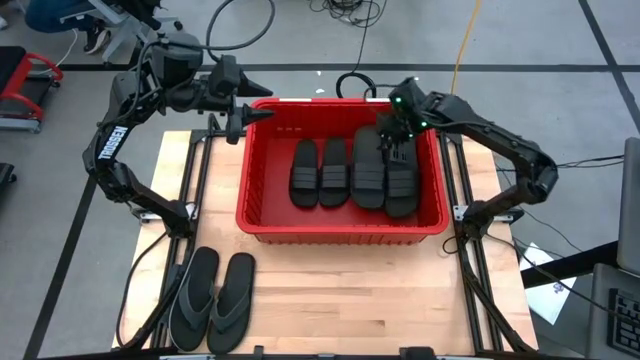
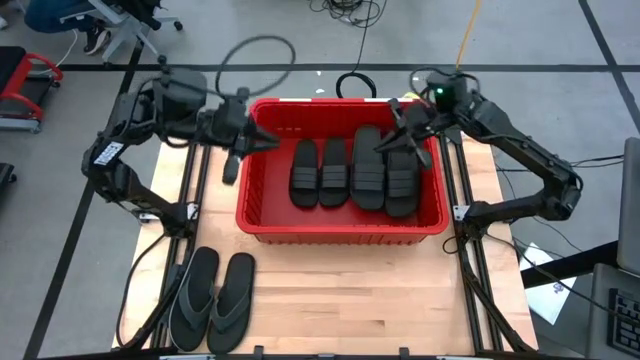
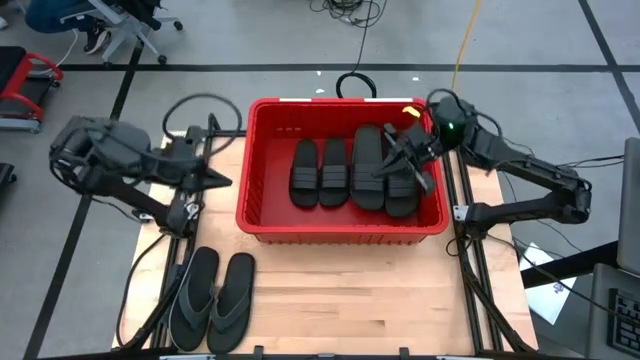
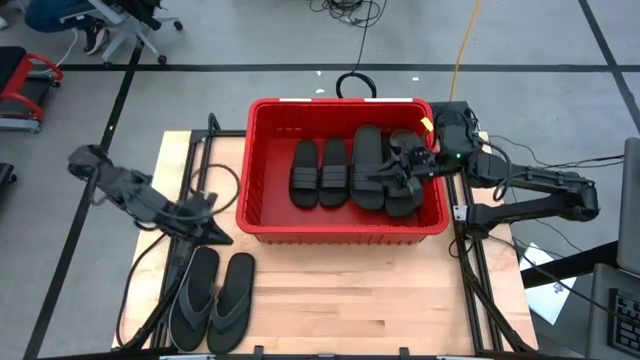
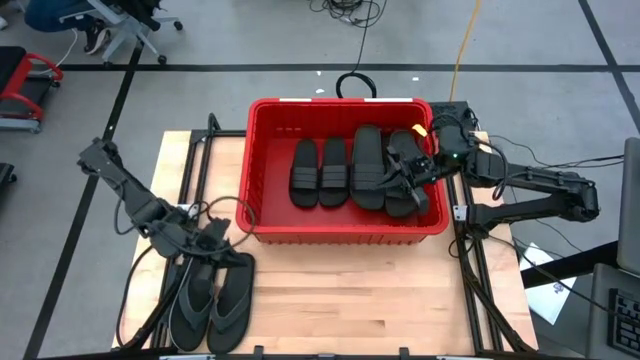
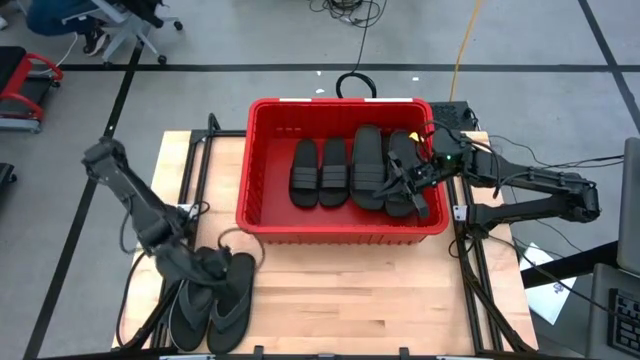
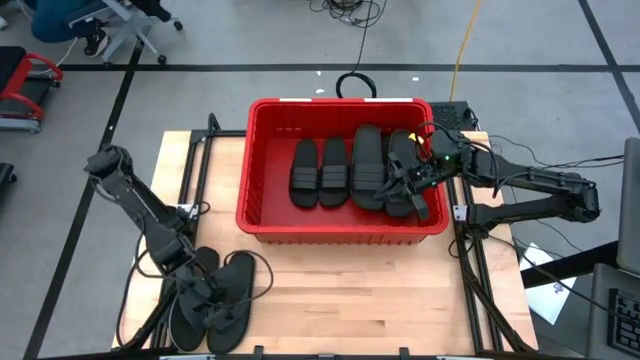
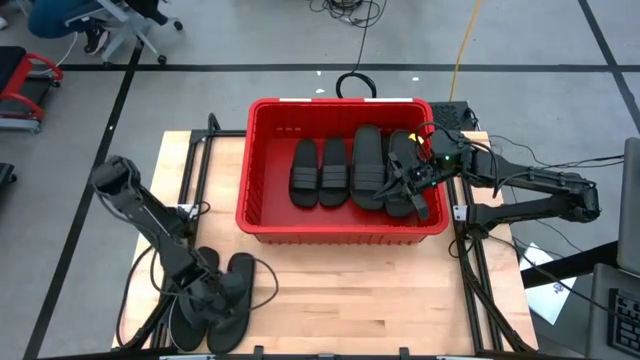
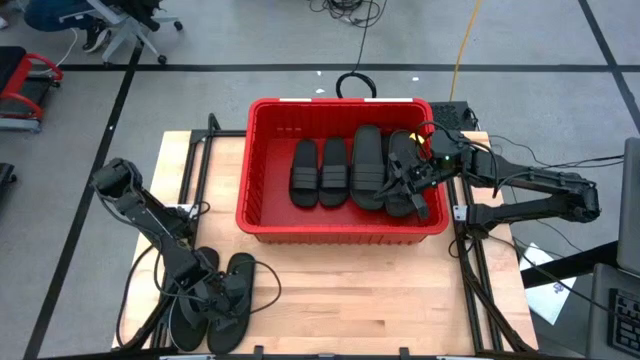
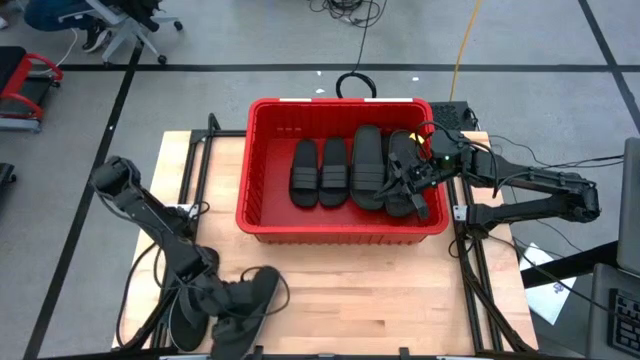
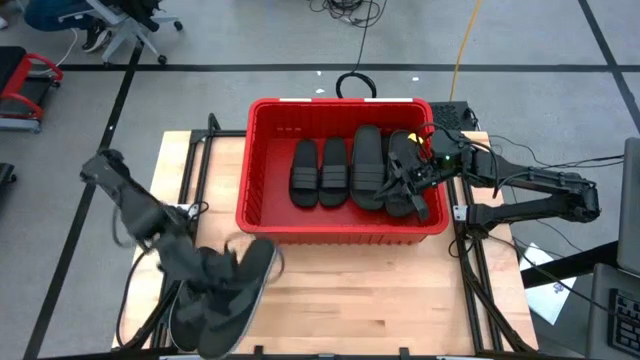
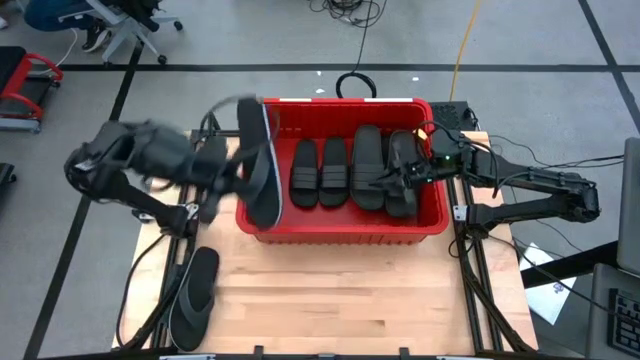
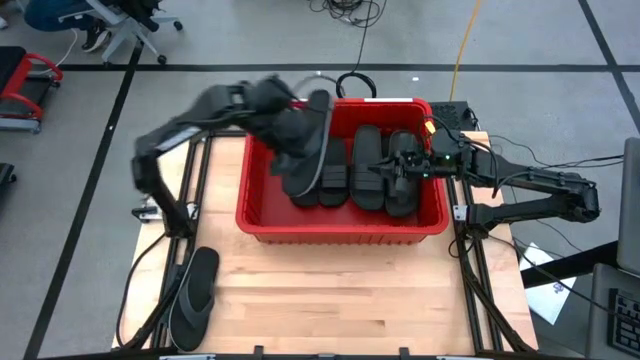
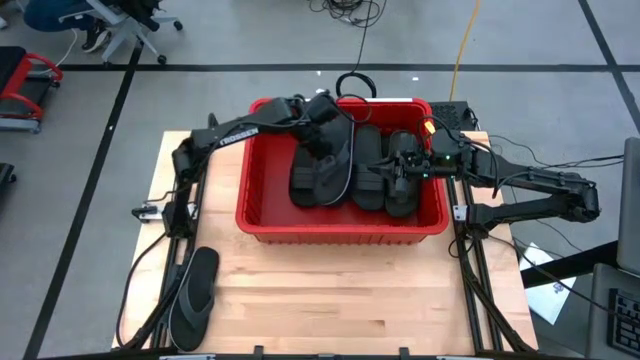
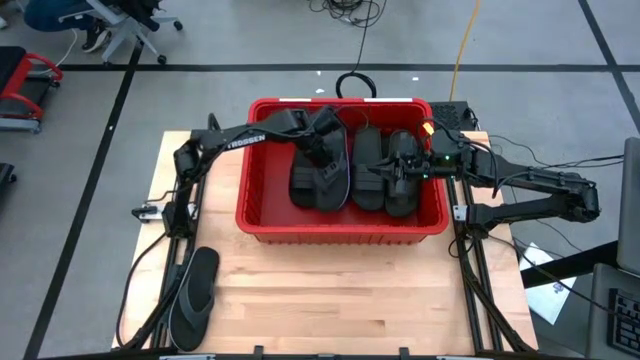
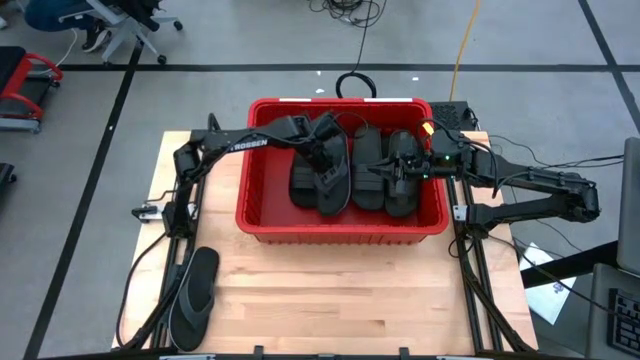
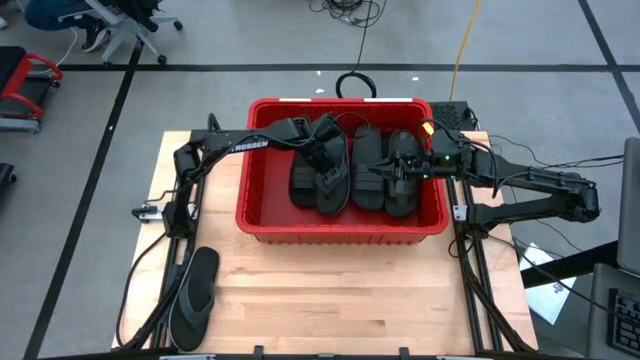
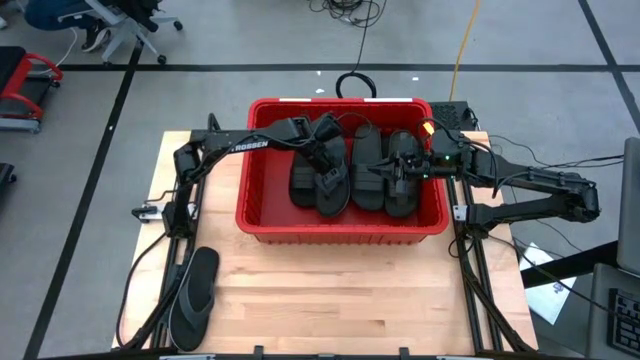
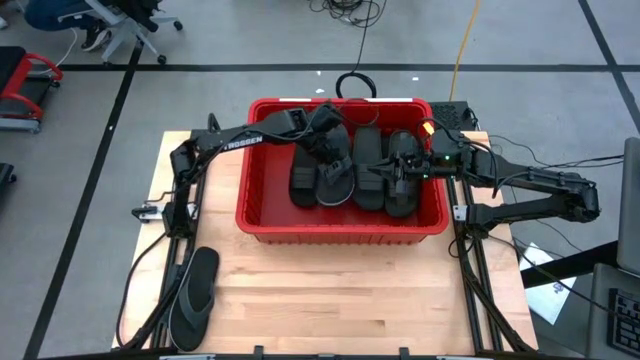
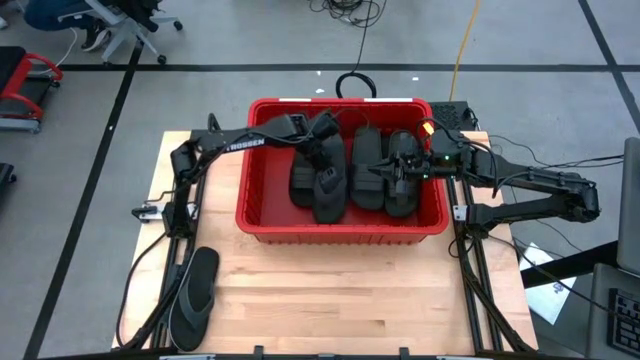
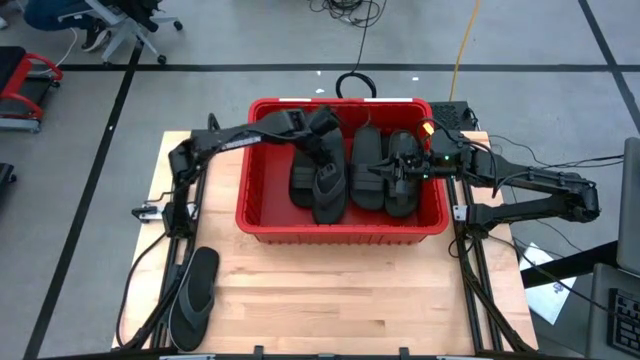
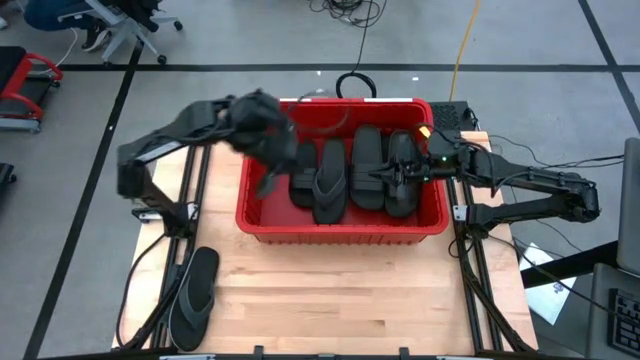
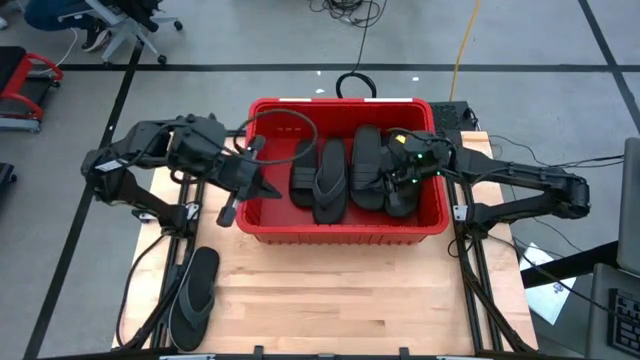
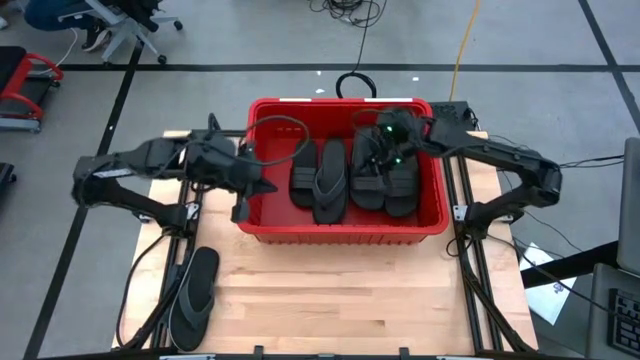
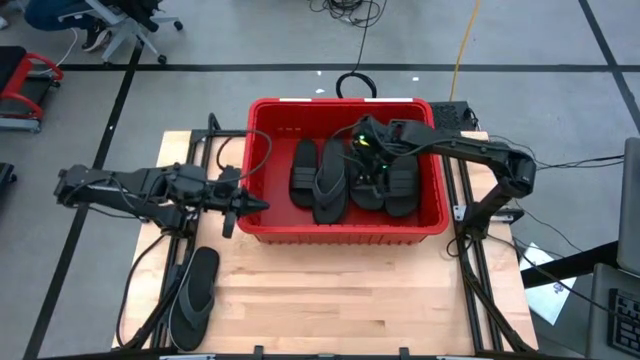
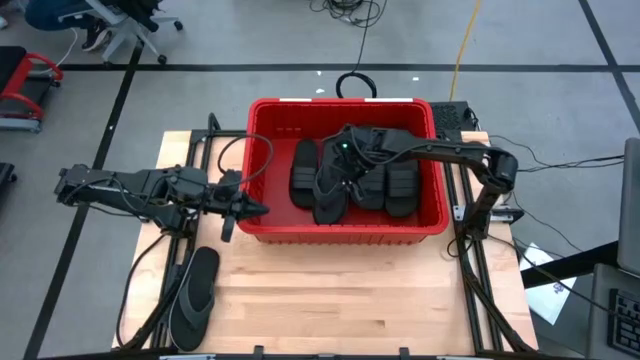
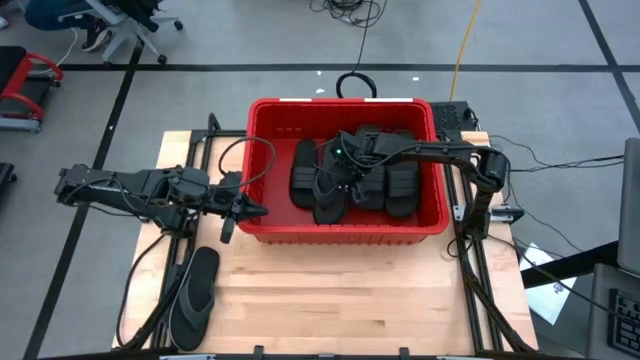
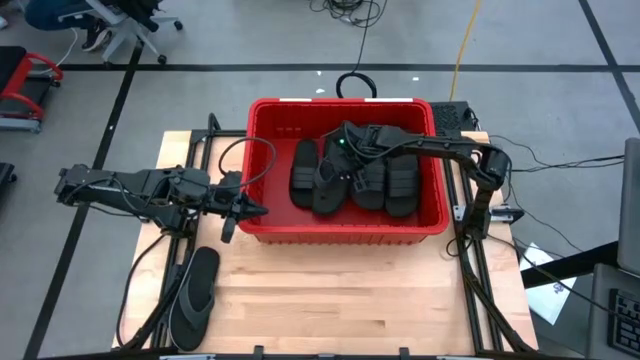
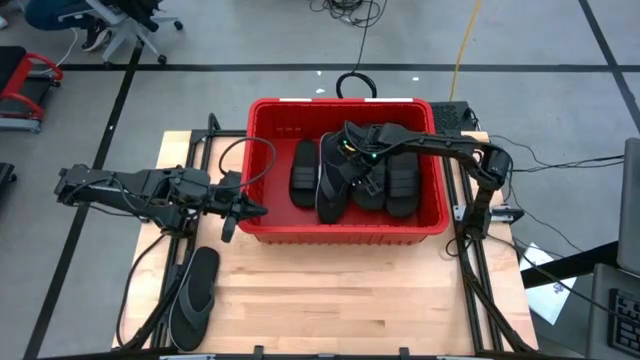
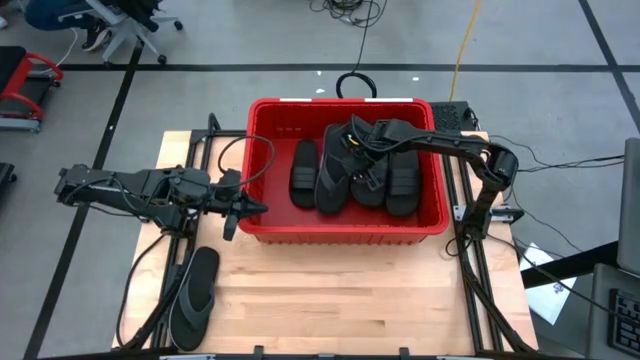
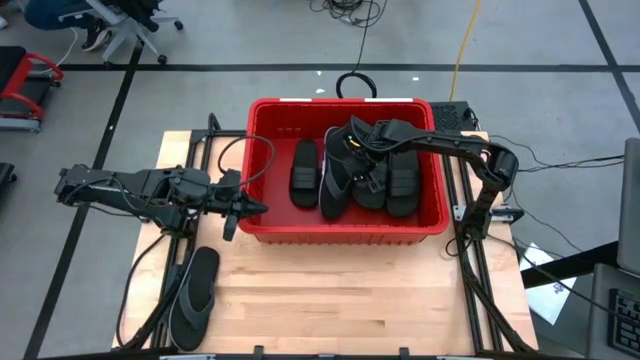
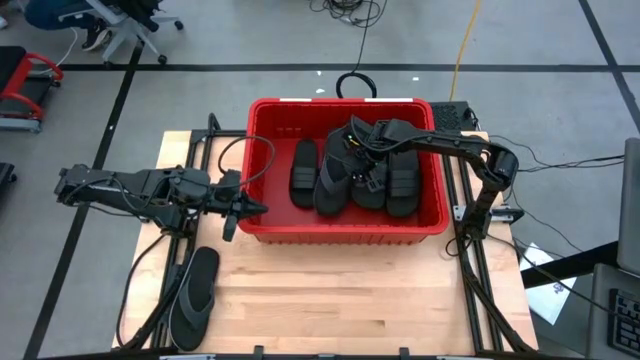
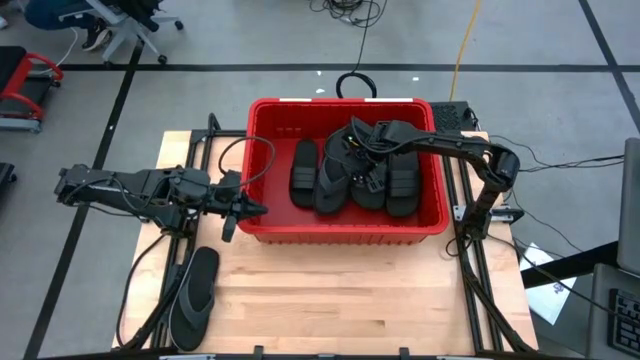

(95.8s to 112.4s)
Task: Pick and place slides into bin
Put the black slipper into the red bin

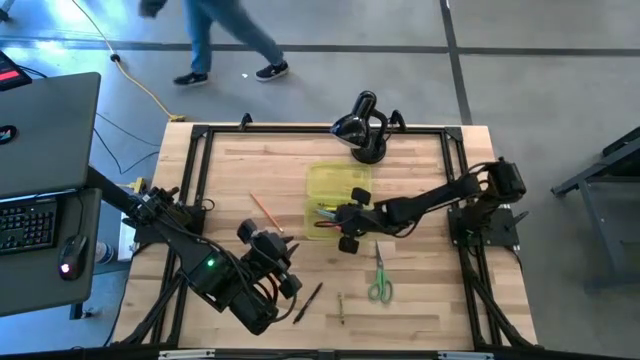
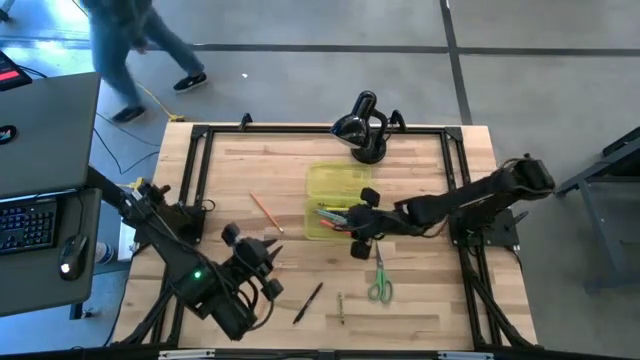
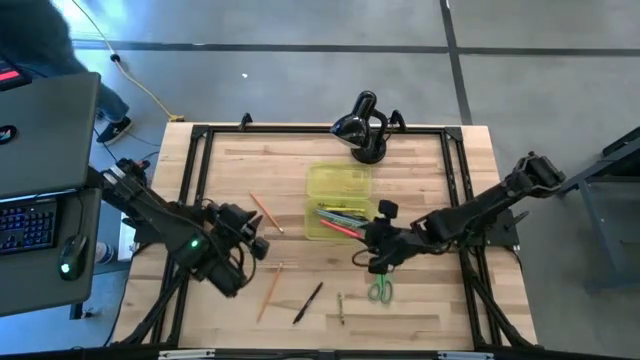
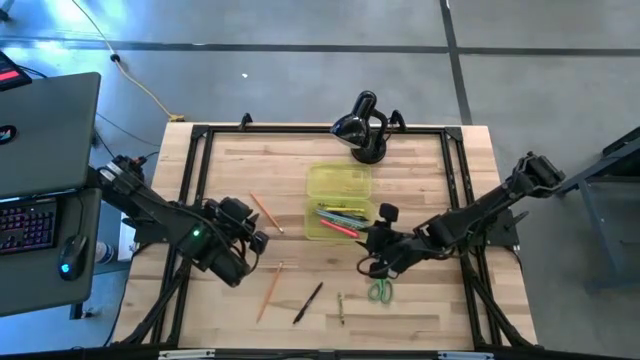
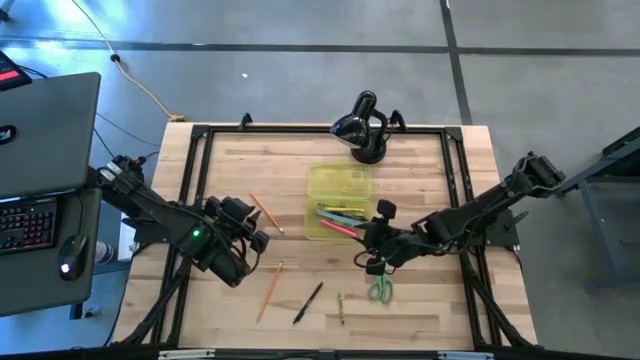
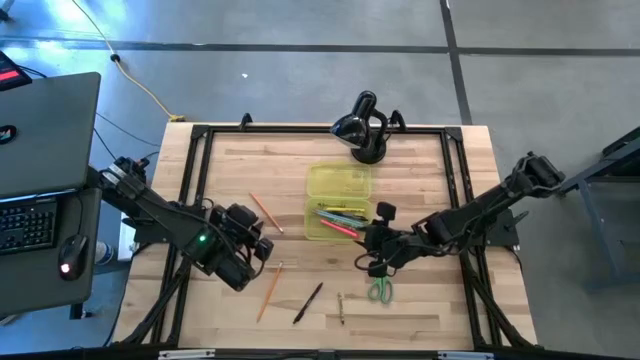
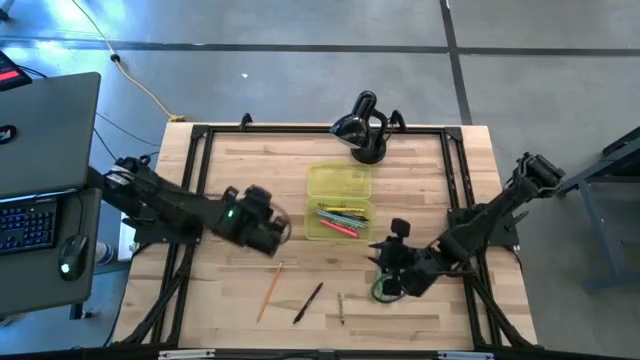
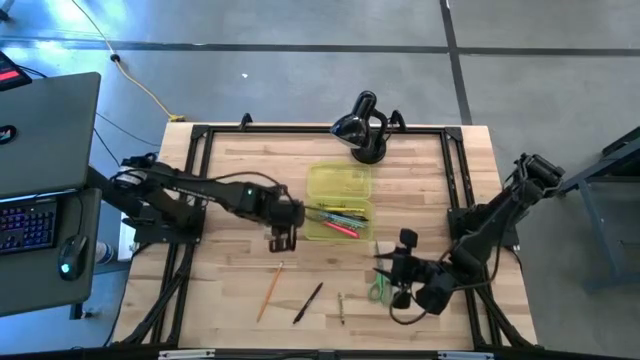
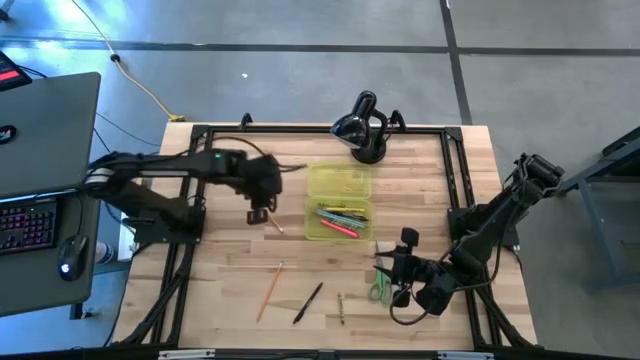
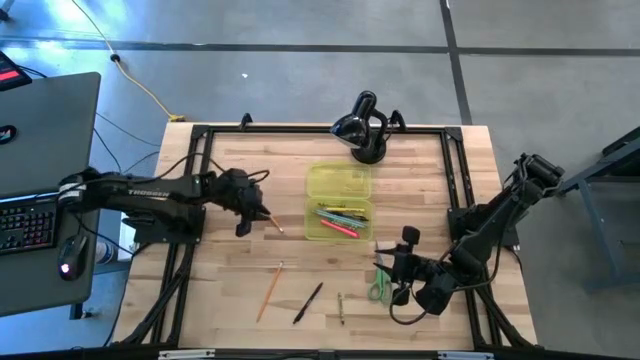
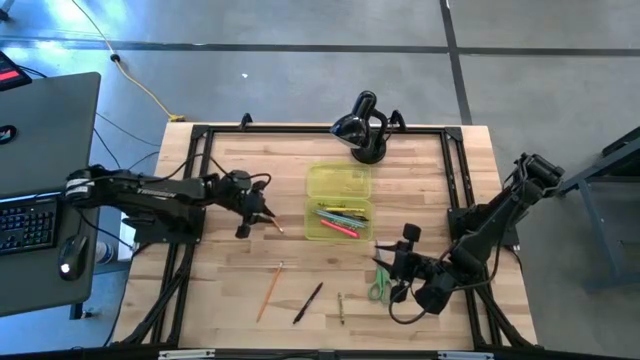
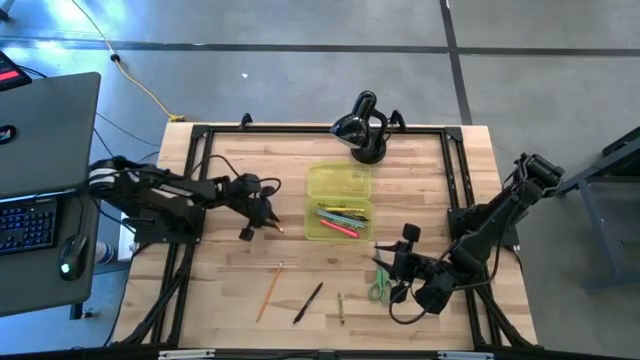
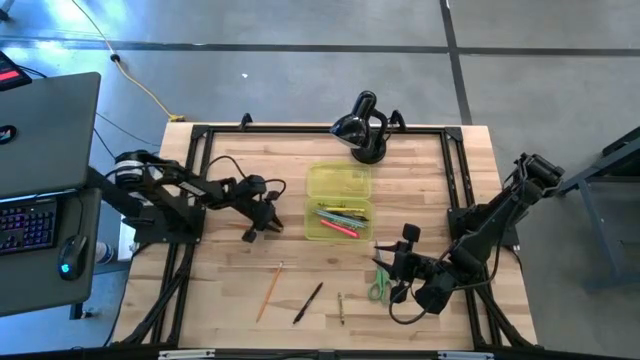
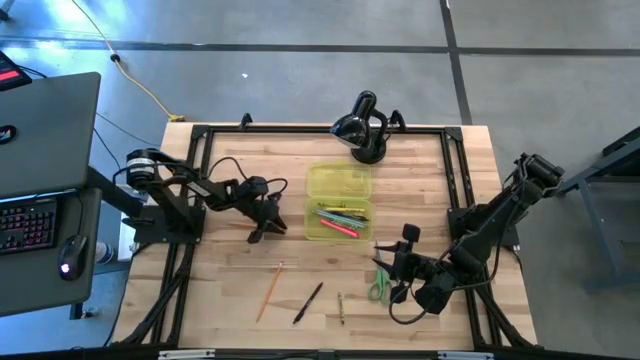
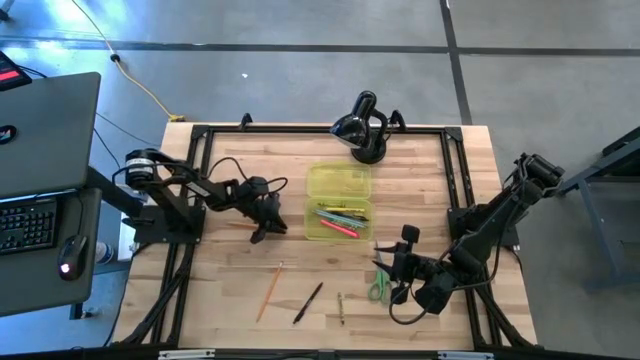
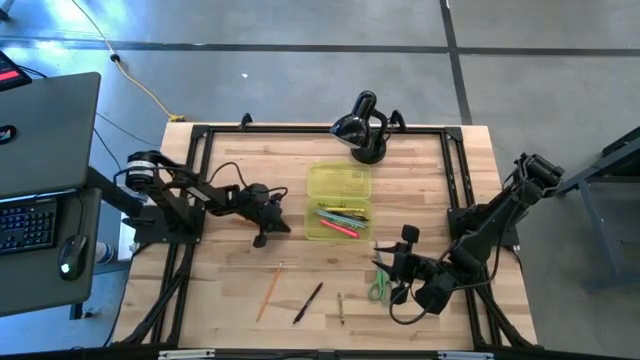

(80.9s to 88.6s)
Task: Pick & place school supplies into a supply box
Put the orange pencil in to the yellow school supply box
